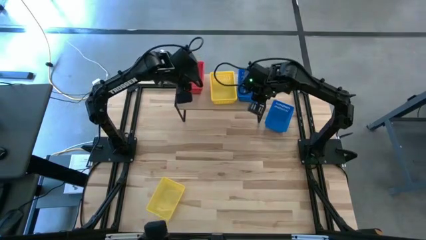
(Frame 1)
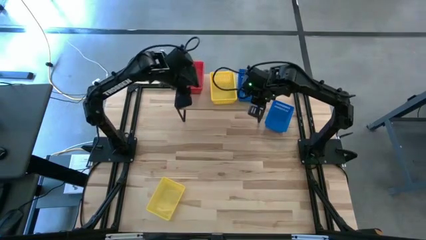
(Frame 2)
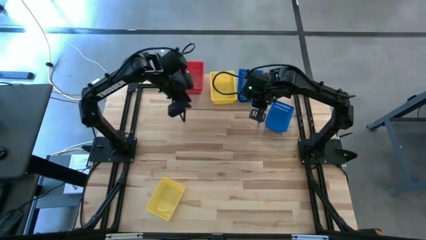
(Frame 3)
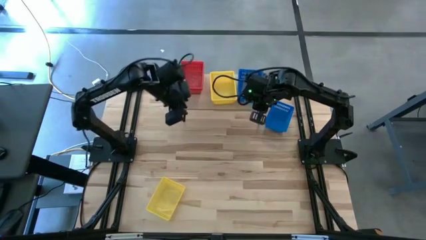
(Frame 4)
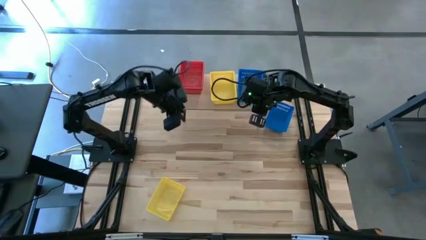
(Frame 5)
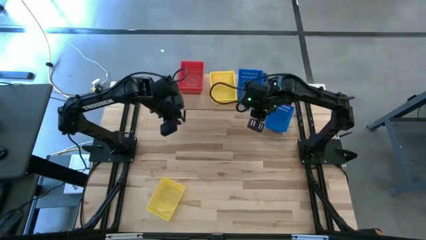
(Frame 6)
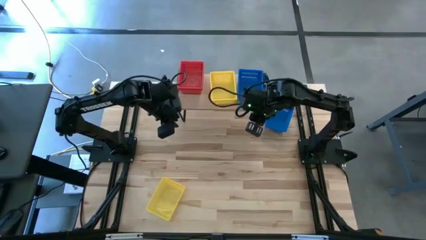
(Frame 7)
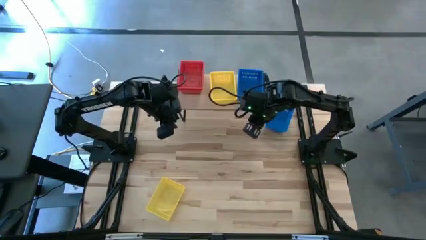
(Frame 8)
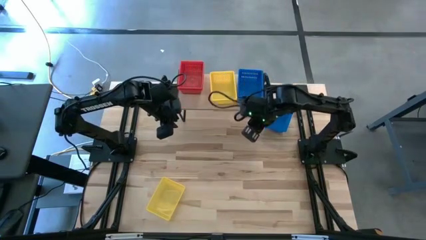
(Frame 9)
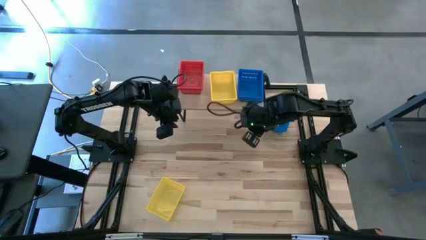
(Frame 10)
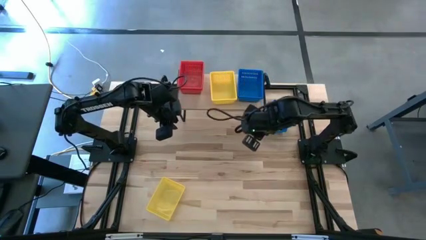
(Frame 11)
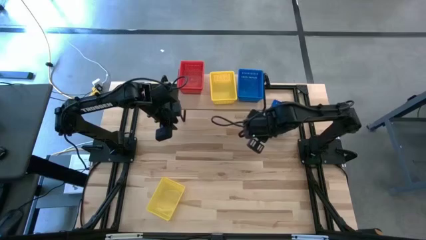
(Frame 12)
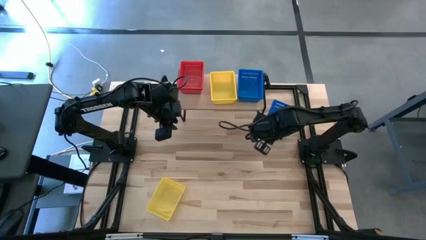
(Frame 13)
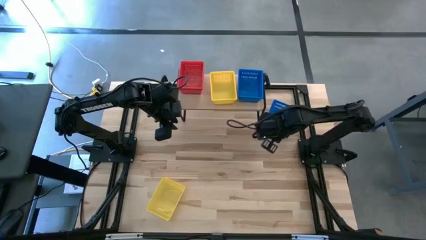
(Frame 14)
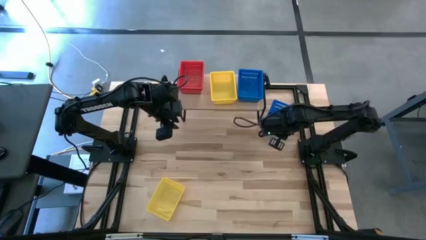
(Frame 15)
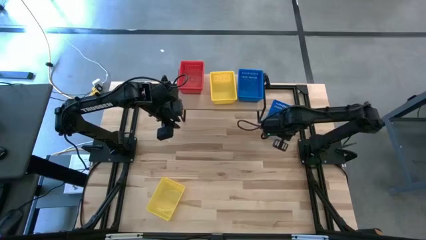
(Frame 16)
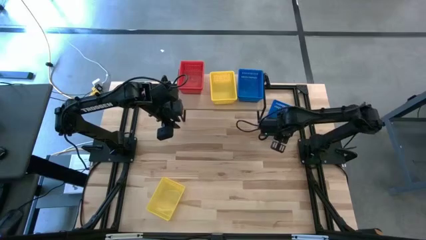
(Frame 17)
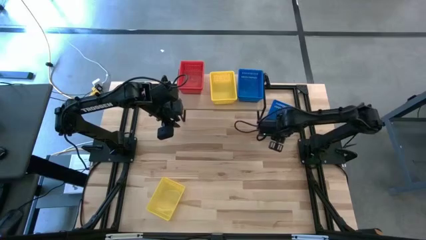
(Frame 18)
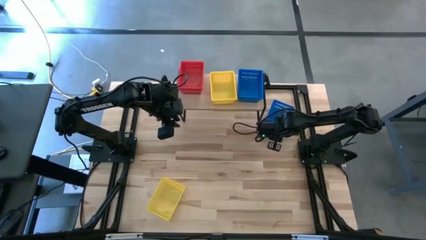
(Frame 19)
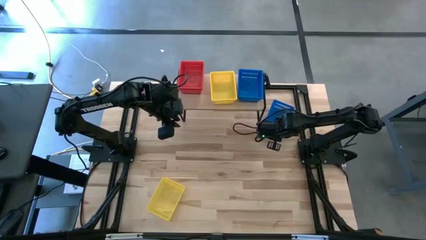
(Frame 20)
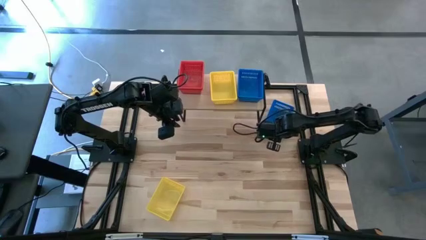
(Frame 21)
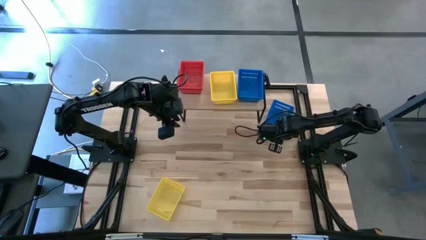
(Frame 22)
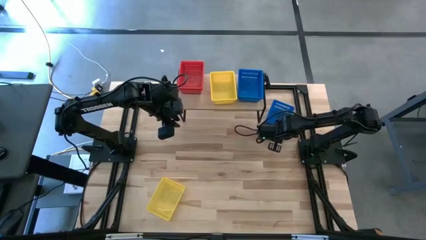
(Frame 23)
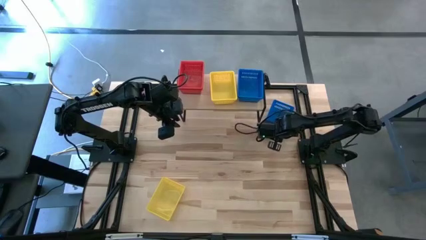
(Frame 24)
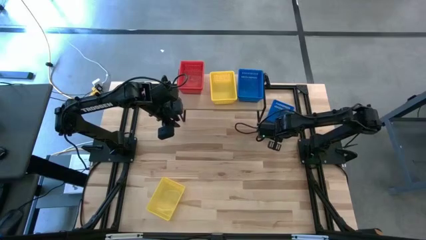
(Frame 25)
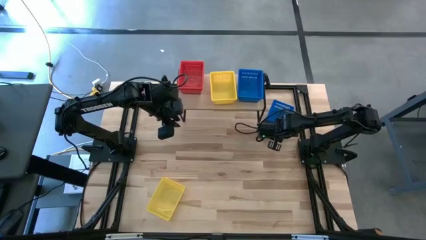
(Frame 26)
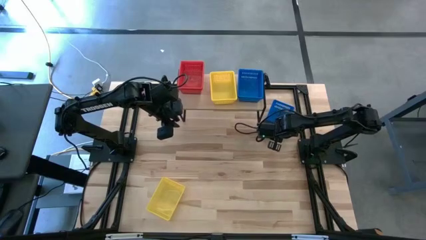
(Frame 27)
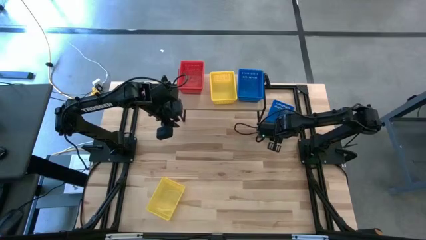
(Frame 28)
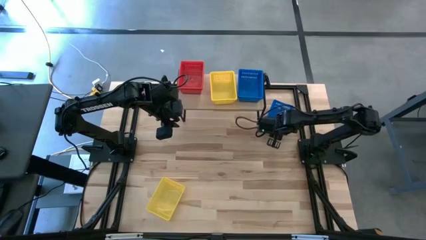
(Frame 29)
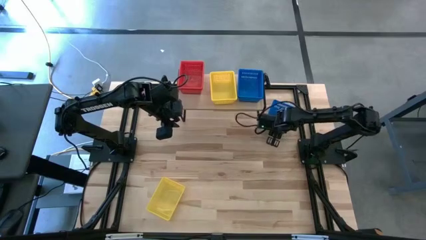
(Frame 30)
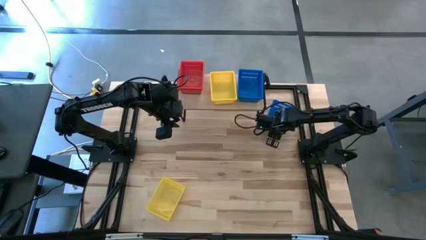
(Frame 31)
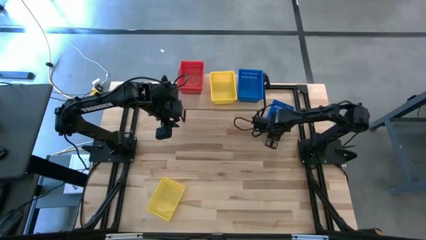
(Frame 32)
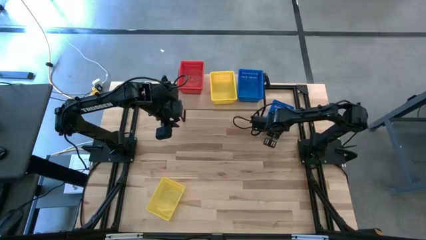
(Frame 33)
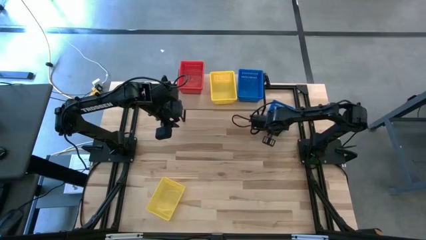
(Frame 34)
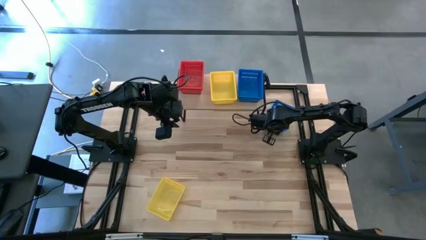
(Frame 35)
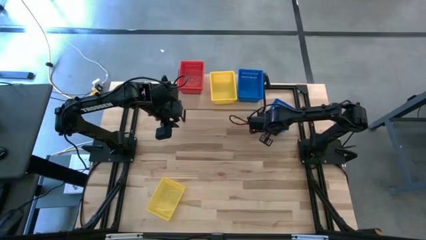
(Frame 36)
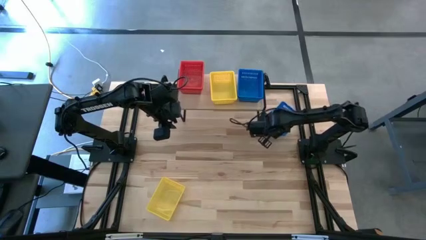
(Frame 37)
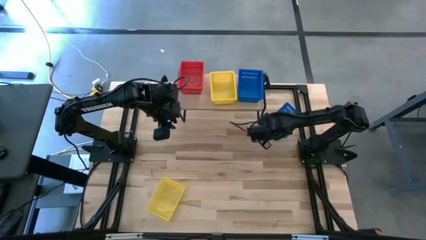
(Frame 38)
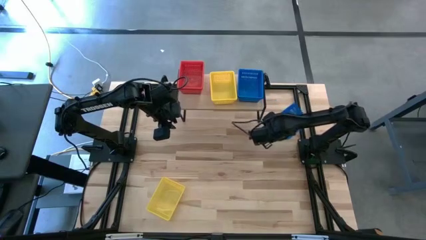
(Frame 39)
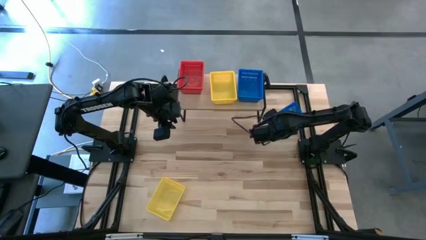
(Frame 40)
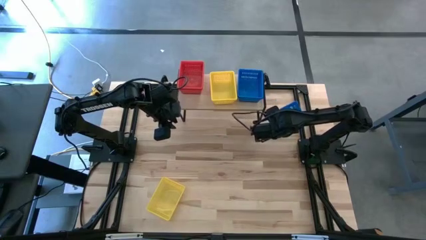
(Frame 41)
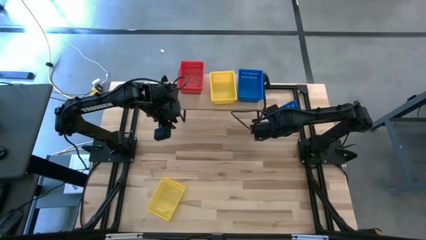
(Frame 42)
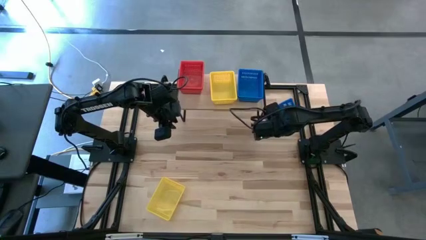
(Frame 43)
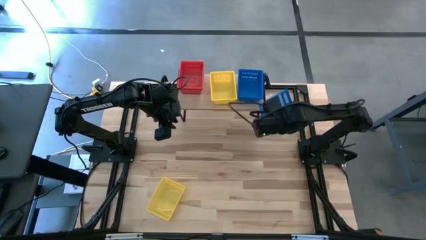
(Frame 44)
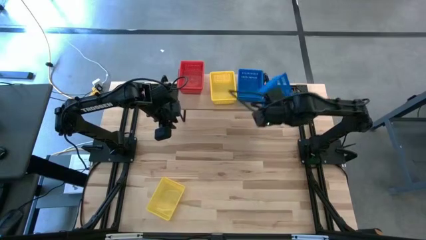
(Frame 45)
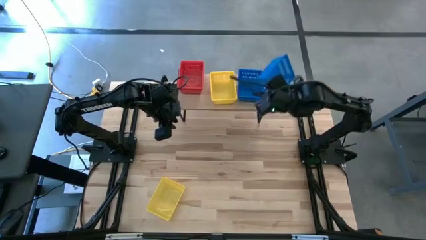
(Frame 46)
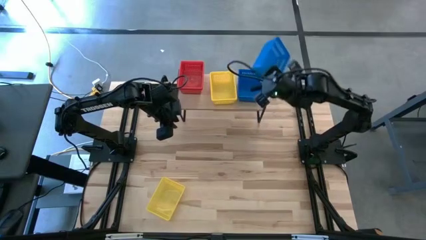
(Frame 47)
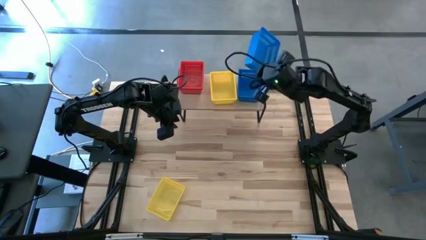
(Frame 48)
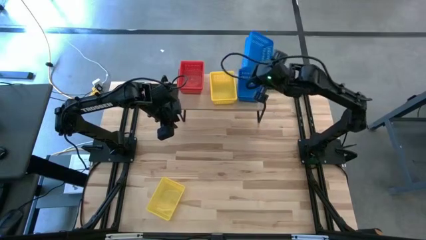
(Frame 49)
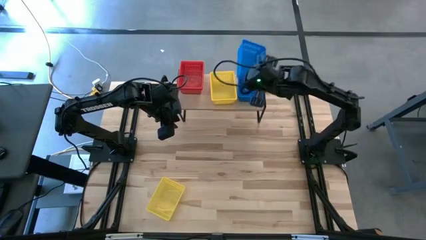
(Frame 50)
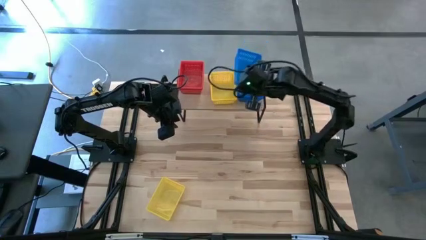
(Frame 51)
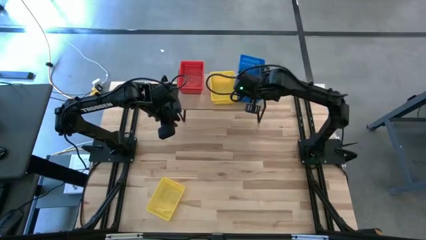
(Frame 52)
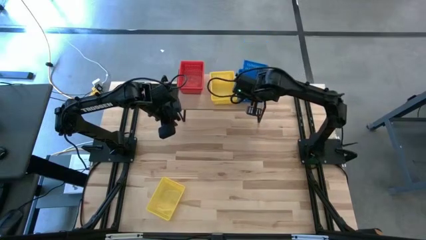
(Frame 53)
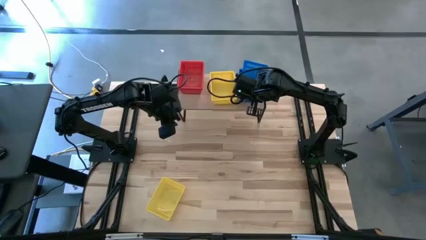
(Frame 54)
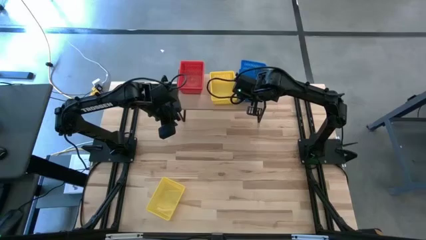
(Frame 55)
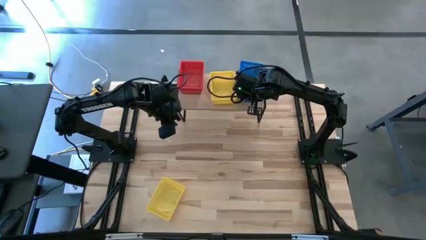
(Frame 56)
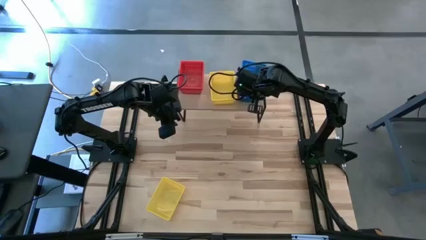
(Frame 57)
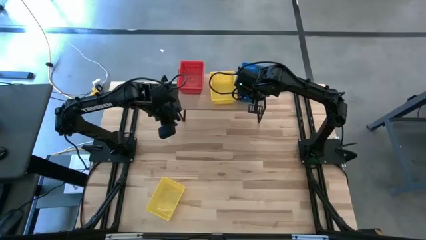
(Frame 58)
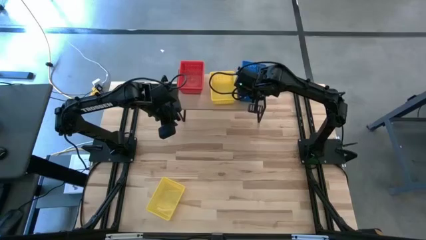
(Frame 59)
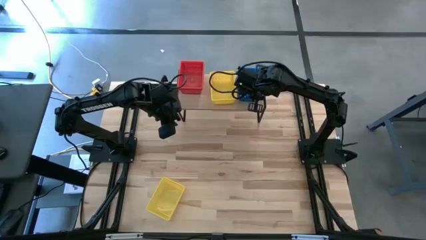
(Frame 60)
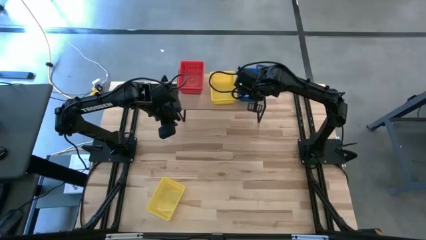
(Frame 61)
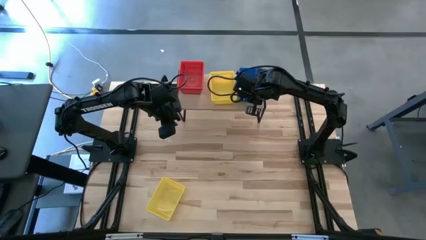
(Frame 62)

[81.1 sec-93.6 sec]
Task: Stack baskets on shelf by color
Stack the blue bin on top of the blue bins on the shelf
